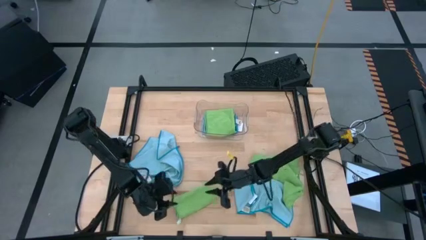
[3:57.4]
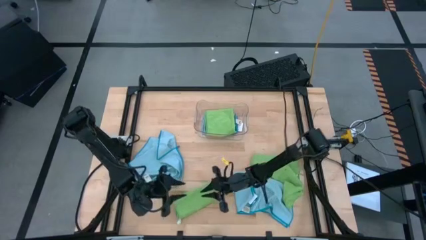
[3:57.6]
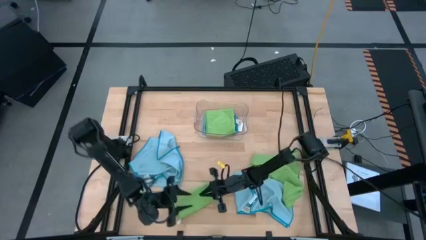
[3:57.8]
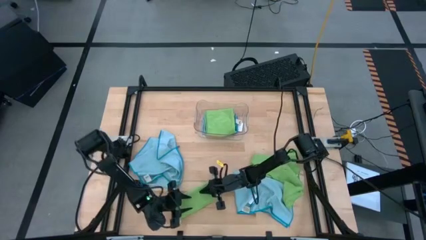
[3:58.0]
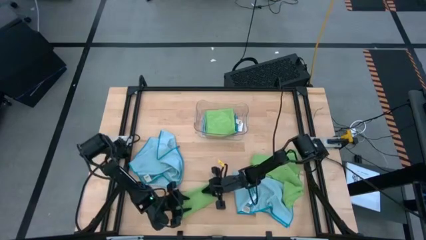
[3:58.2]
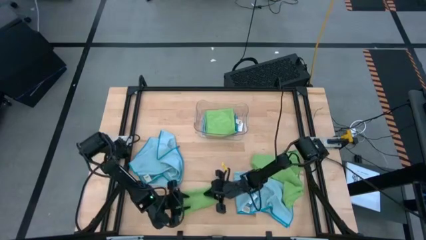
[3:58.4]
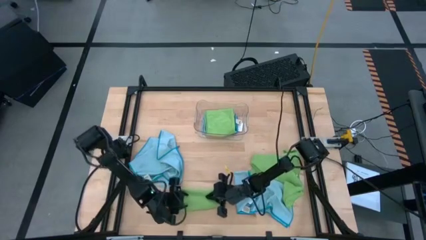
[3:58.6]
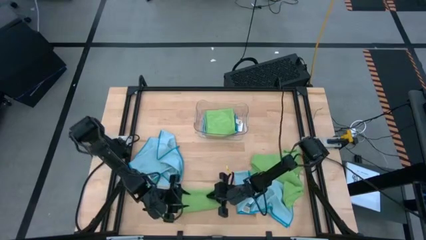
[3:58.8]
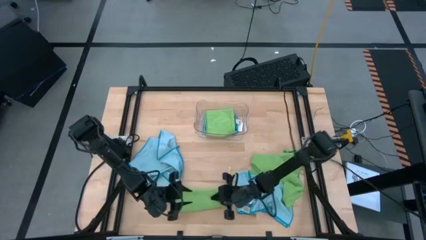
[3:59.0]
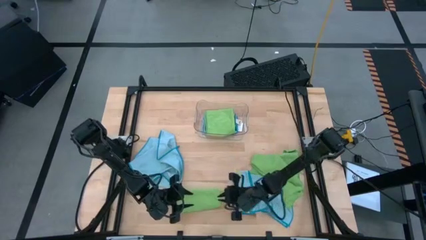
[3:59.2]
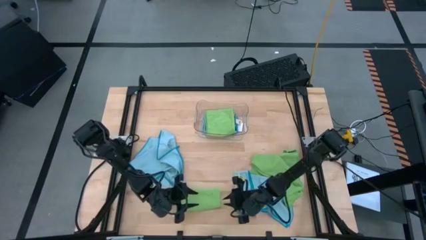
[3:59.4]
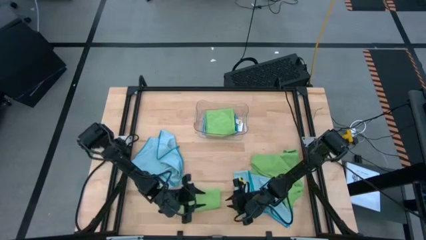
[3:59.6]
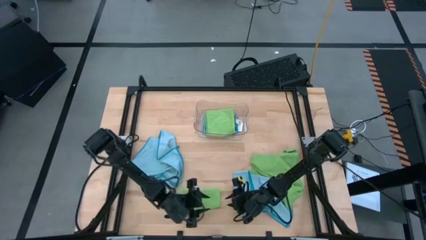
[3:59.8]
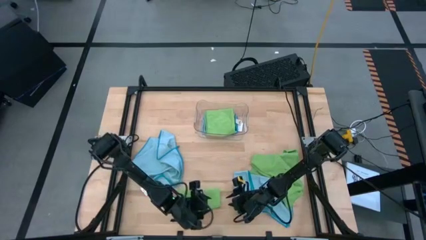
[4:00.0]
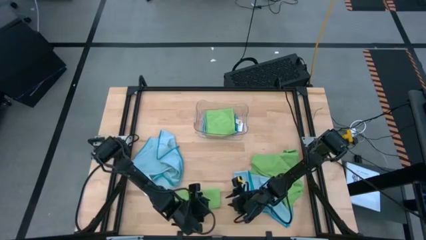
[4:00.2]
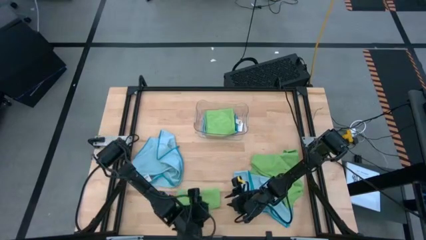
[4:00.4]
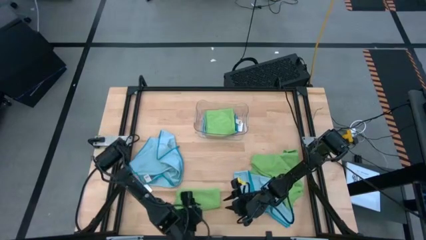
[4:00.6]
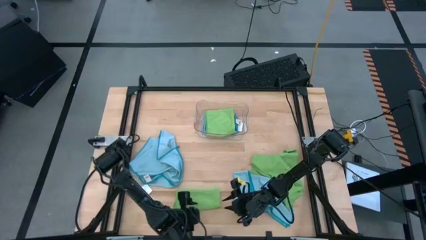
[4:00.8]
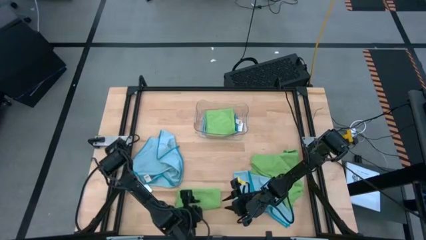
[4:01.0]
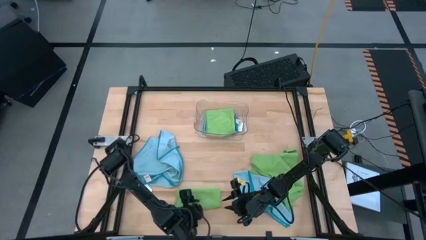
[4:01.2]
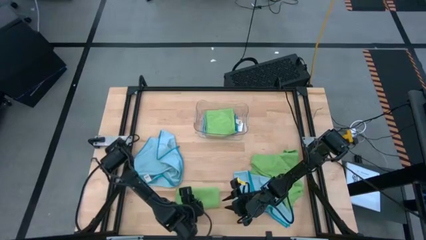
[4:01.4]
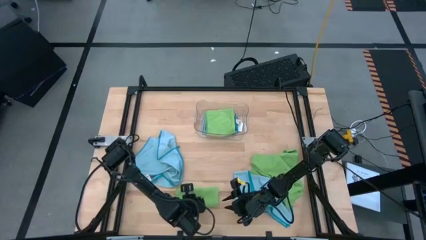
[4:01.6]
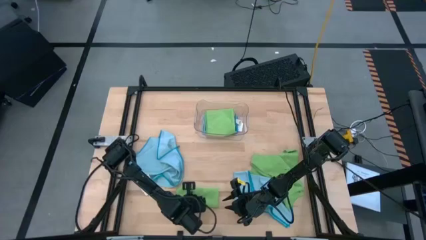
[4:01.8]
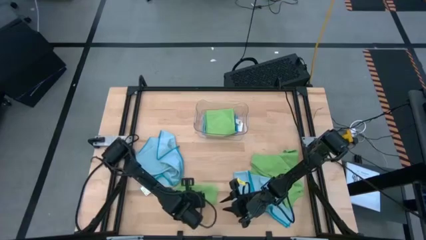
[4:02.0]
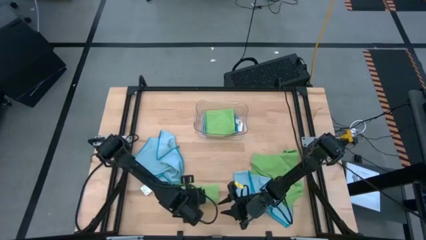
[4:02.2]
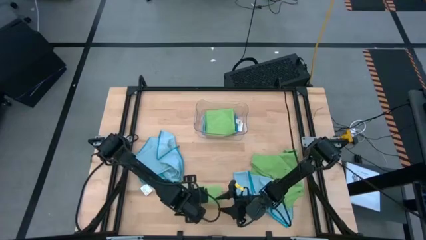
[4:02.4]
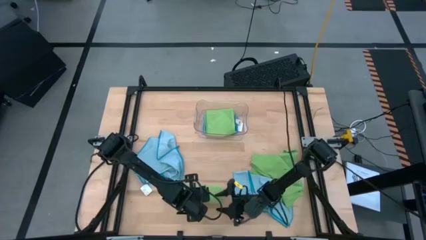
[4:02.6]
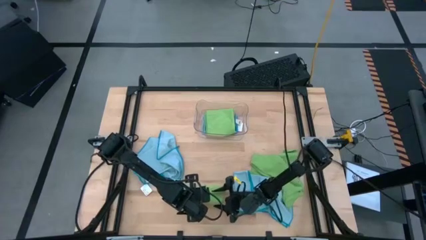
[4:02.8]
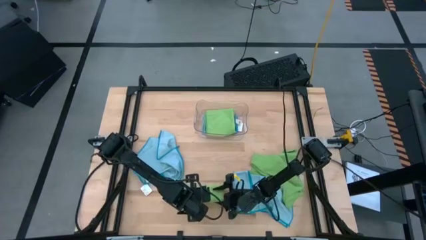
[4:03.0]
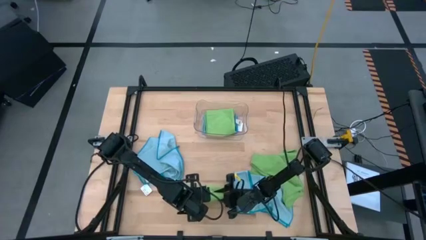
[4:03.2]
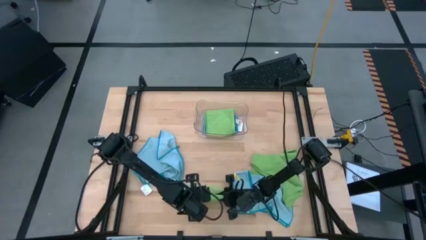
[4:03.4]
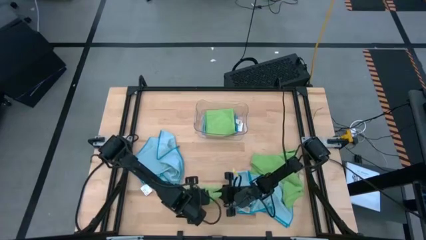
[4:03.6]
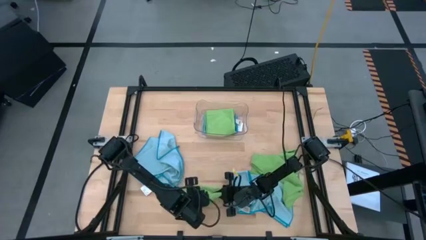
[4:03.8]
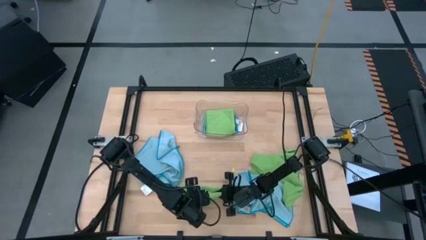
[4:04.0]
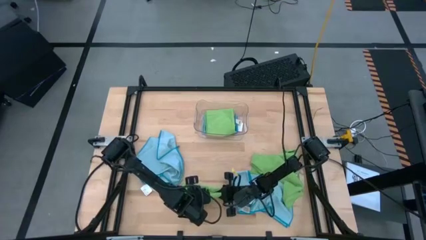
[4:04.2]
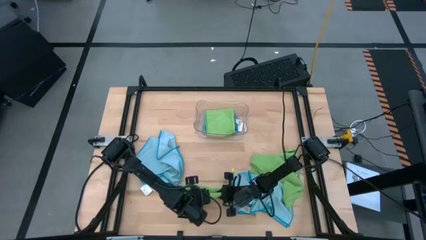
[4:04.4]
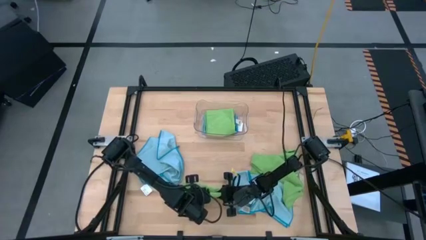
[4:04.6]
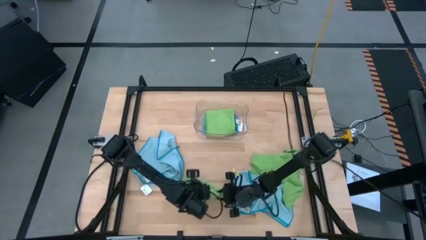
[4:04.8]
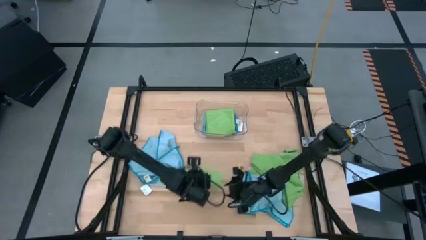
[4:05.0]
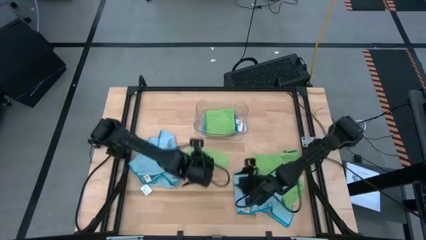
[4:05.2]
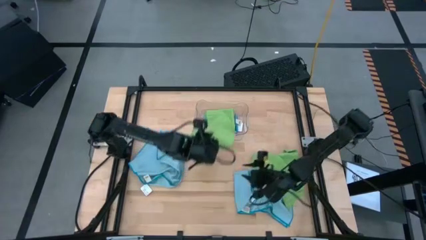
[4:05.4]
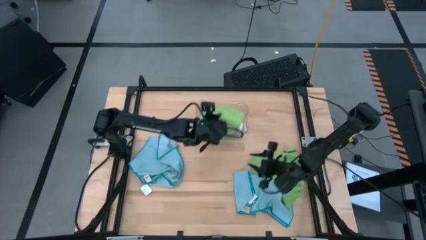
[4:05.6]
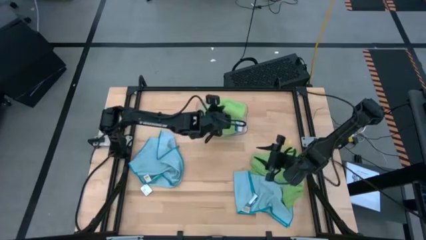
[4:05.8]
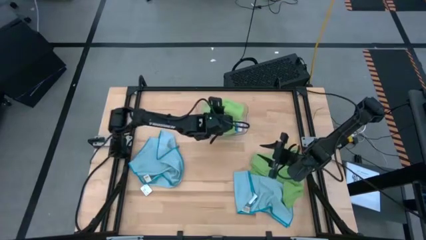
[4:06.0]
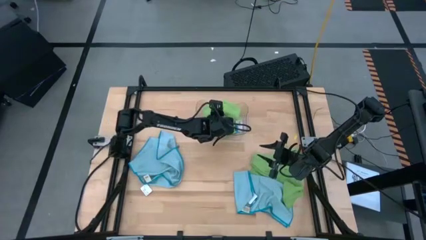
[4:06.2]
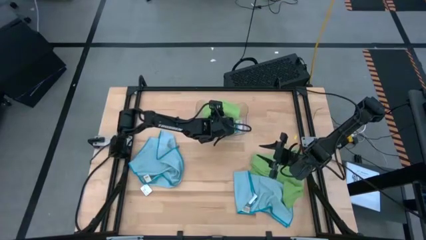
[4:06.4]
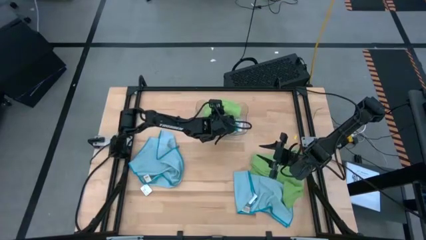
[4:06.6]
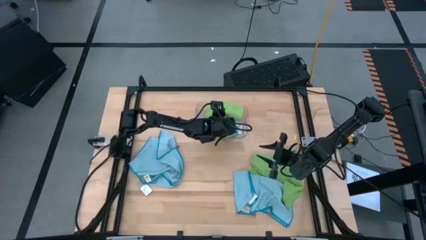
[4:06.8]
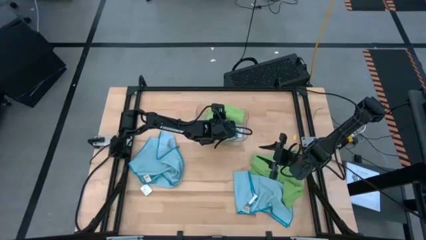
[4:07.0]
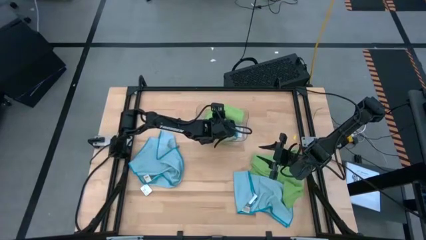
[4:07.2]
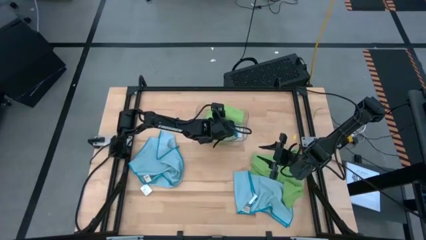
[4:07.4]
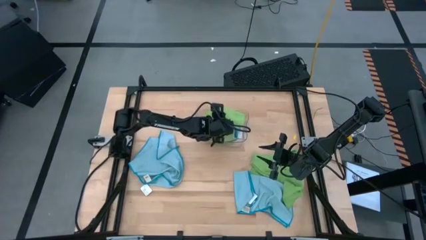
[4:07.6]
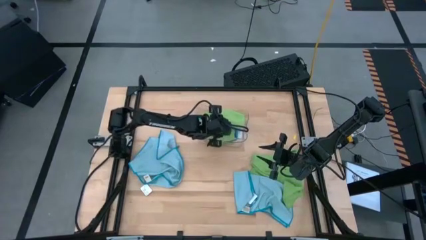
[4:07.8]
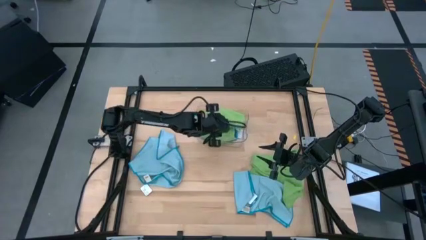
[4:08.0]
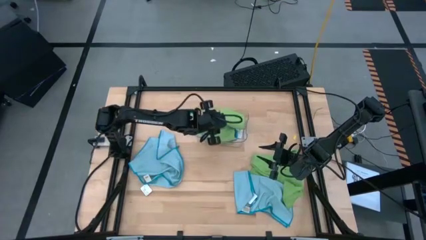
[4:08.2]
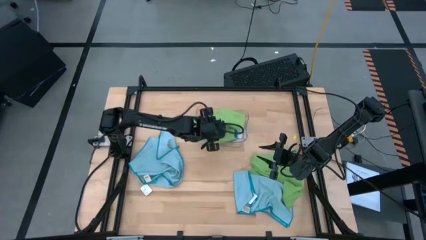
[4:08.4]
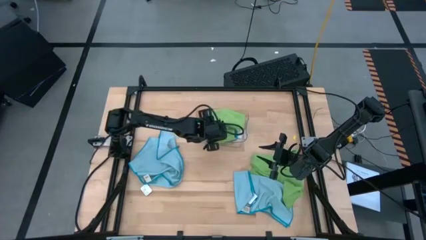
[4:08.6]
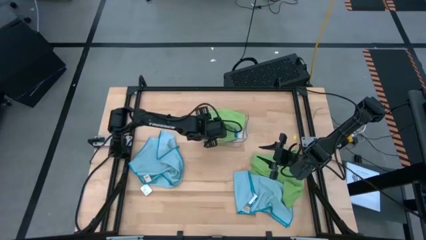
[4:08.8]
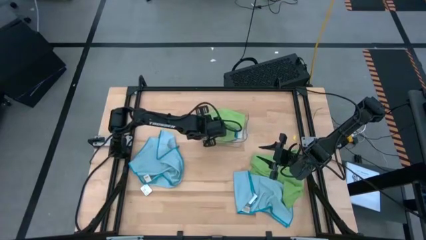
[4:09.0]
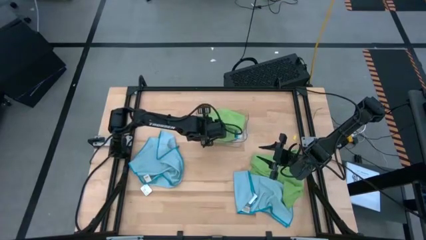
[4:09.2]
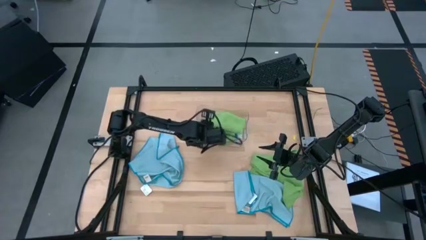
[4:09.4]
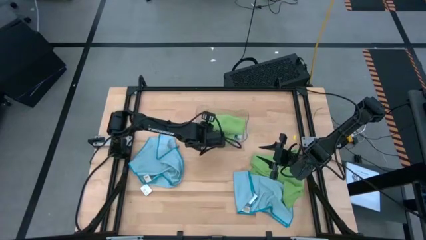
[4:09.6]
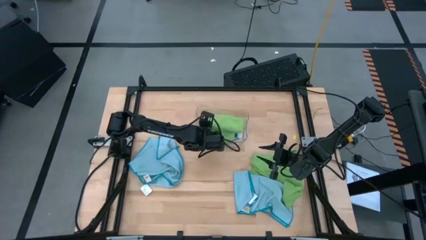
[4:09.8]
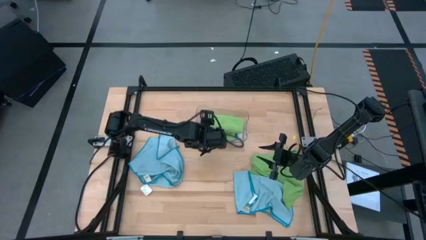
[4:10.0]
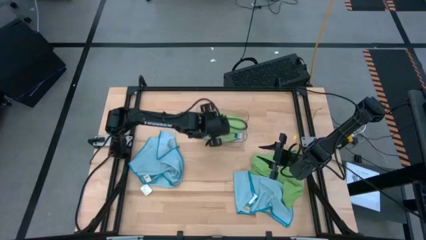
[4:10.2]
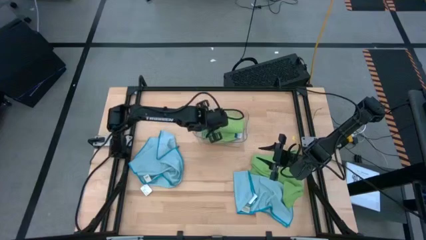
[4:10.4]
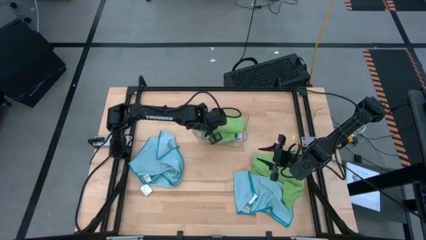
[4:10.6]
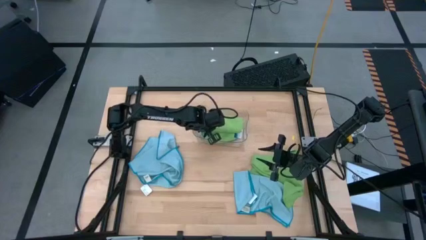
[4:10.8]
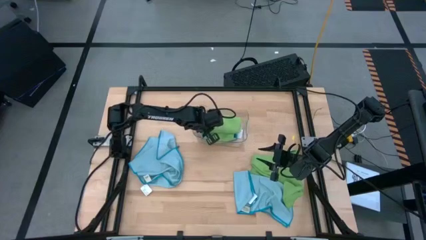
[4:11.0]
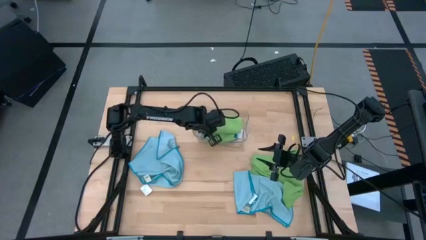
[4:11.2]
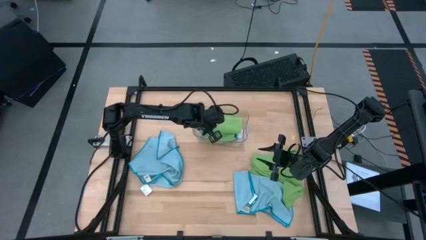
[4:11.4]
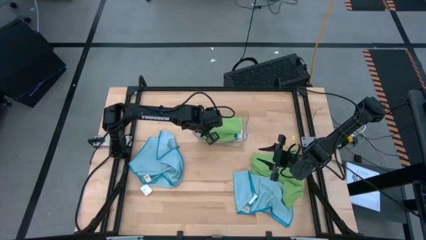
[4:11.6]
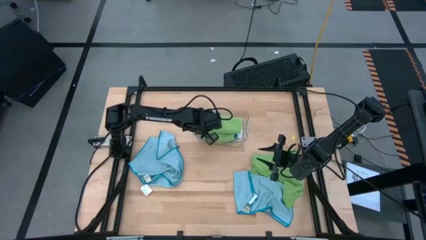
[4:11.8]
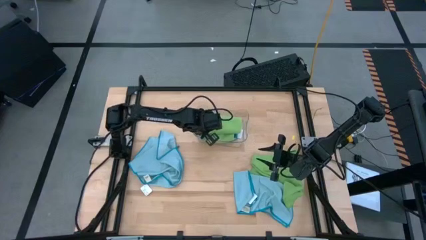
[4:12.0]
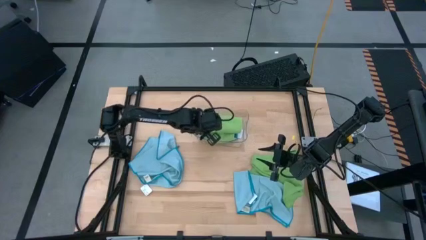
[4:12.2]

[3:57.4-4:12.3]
Task: Fold microfiber towels
Stack the folded left green microfiber cloth on top of the other green microfiber cloth in the transparent bin
